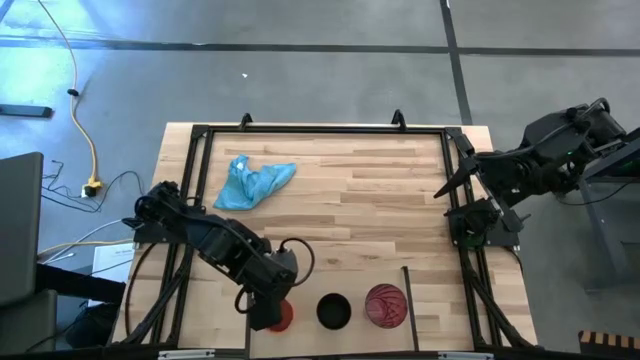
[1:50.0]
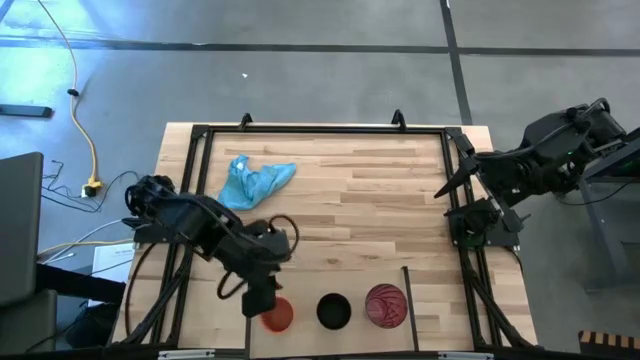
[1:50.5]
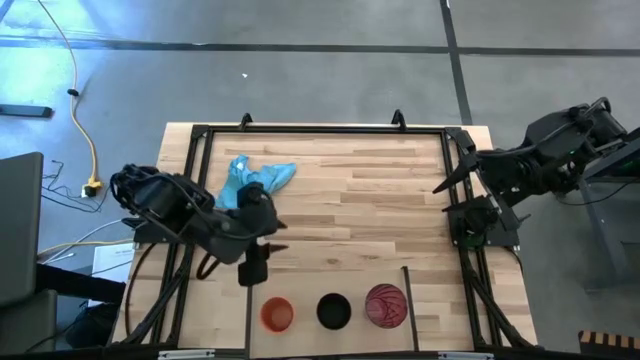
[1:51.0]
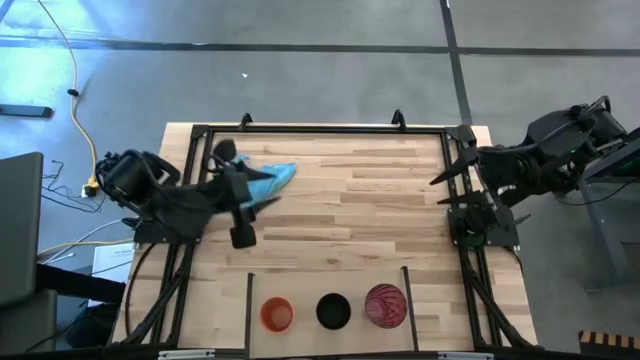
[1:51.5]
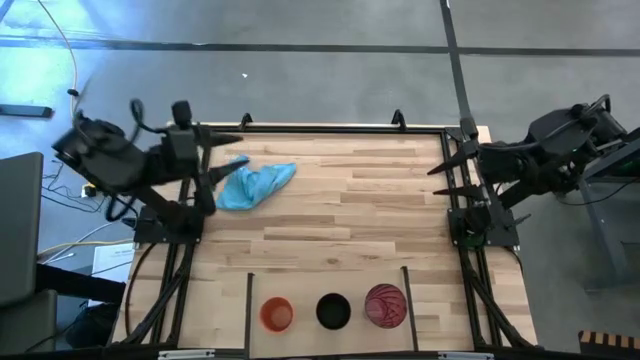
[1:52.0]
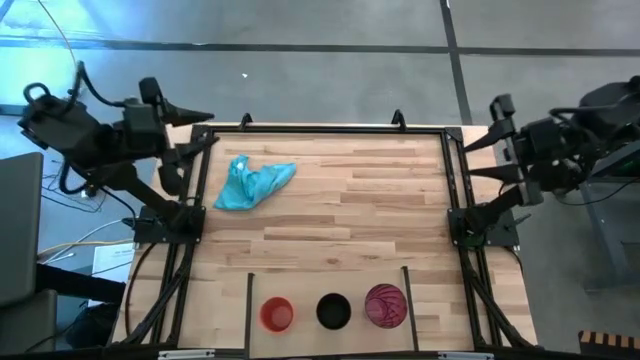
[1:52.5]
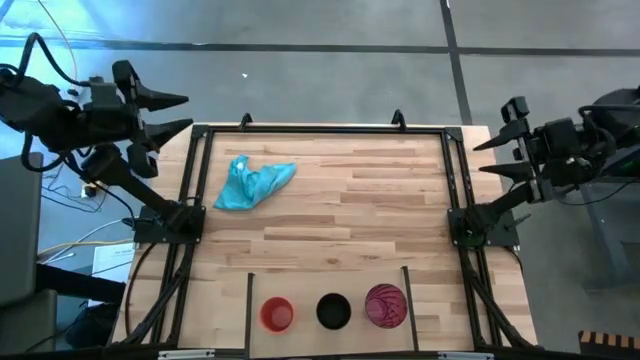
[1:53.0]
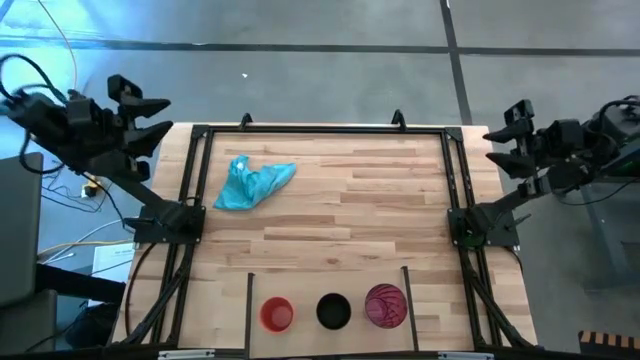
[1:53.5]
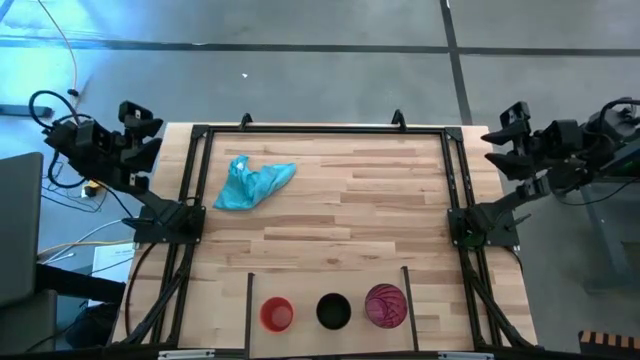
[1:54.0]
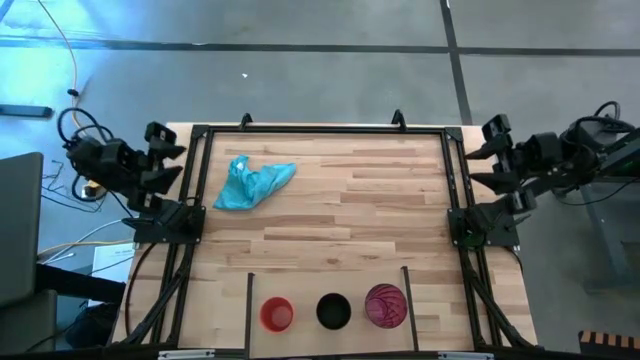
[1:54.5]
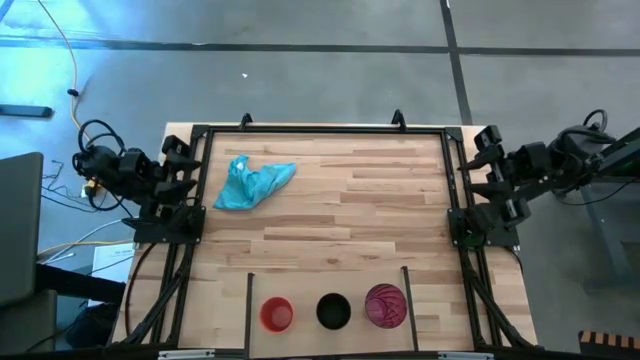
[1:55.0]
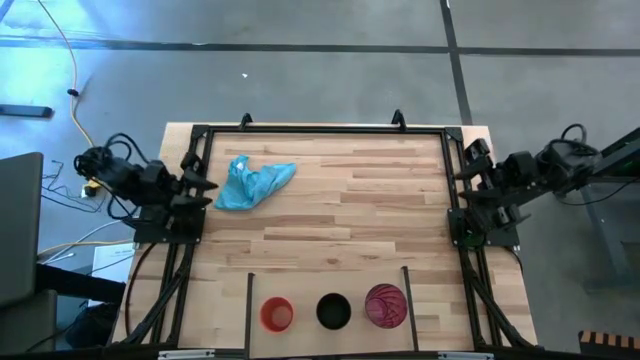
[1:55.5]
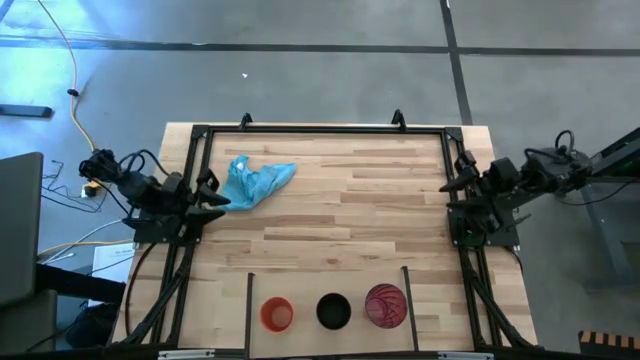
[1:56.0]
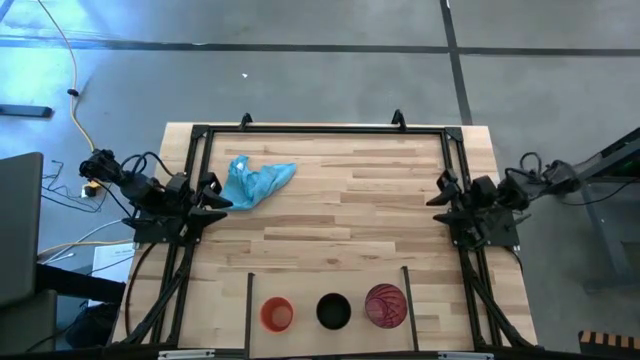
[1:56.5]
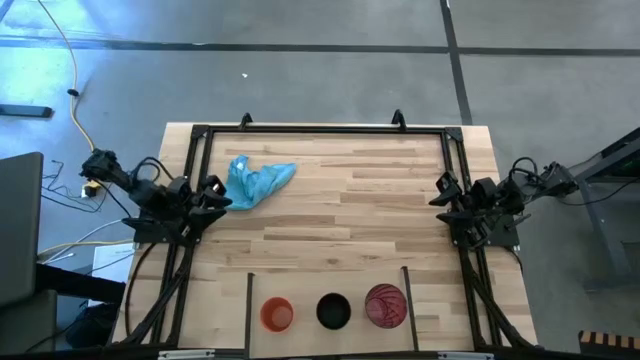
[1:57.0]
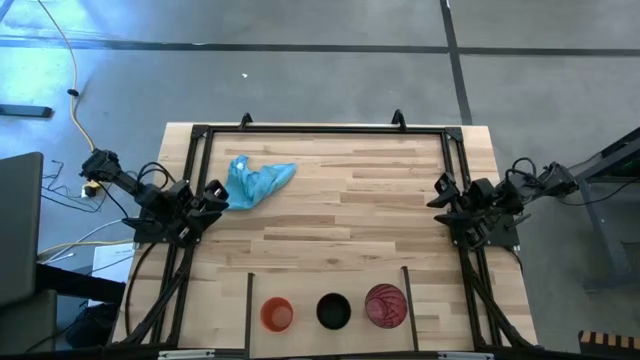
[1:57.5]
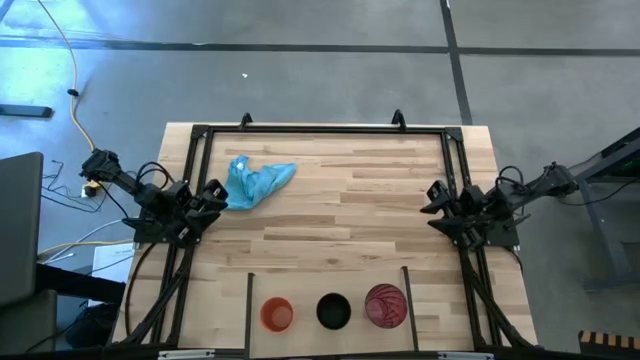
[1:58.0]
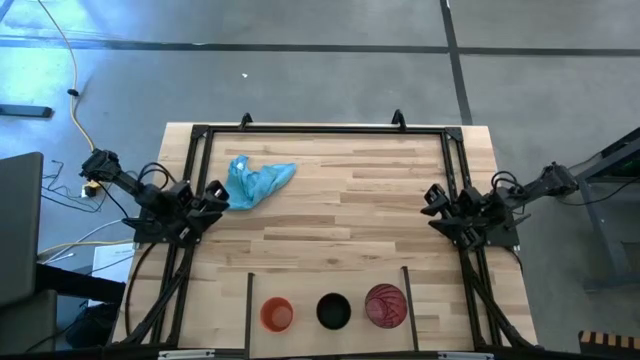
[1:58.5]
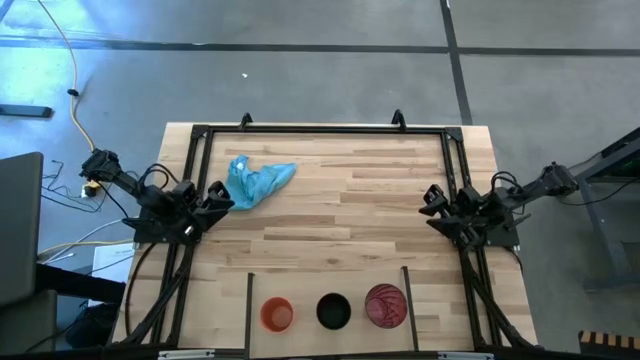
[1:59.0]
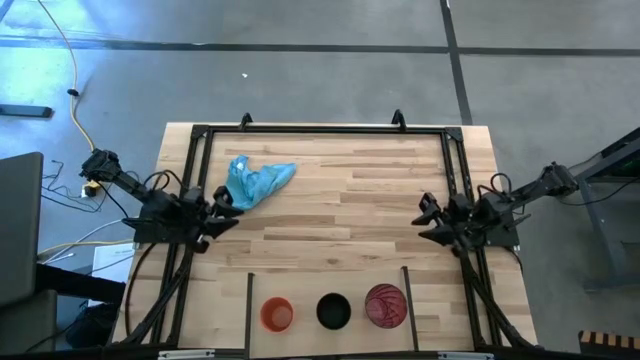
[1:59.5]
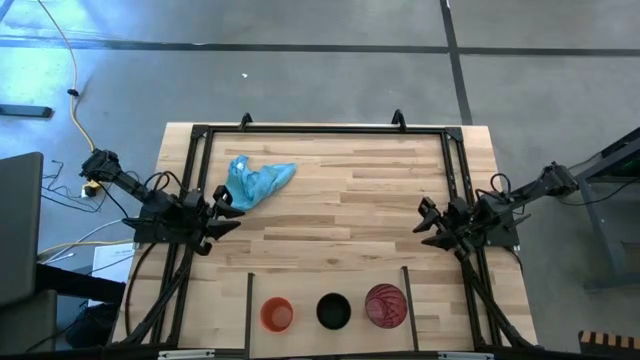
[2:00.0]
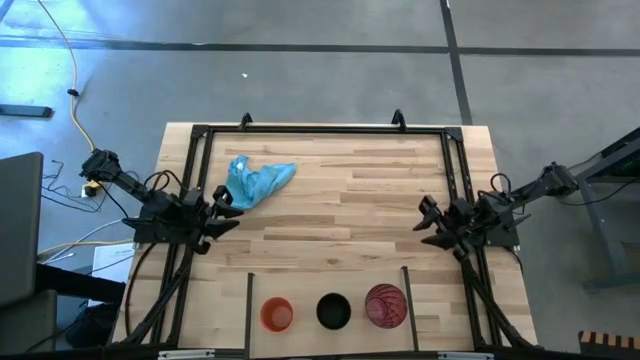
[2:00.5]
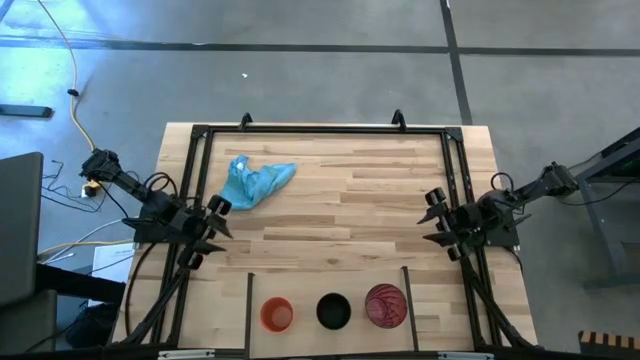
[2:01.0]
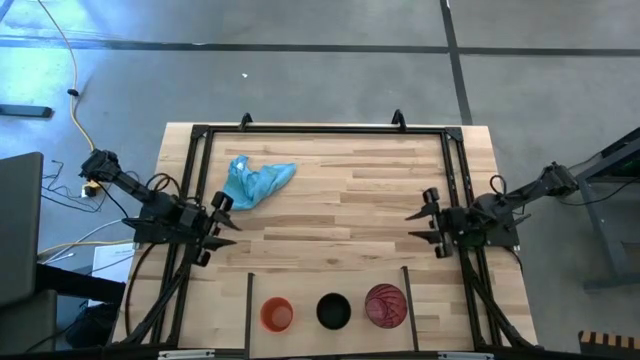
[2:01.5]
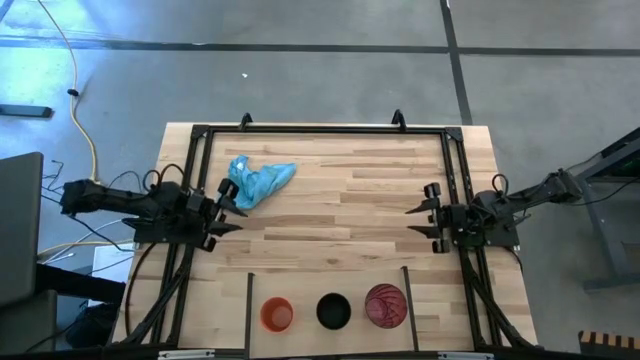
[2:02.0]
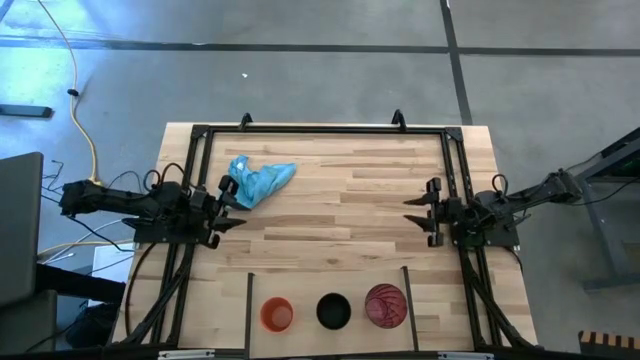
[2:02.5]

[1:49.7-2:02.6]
Task: Stack small to large cups/mugs on shelf
Return to Home Position

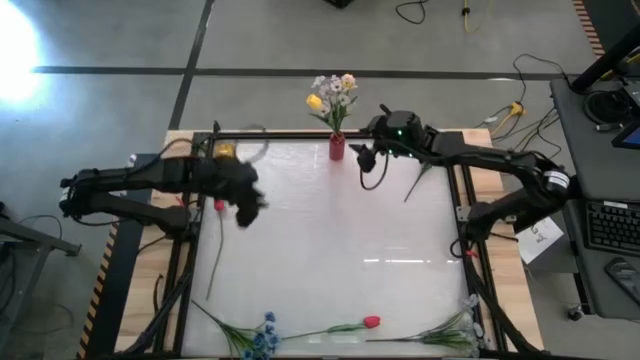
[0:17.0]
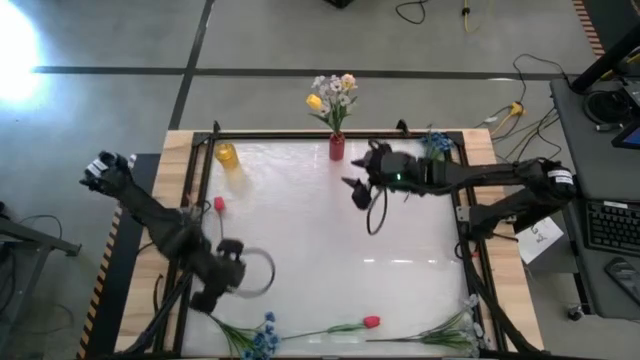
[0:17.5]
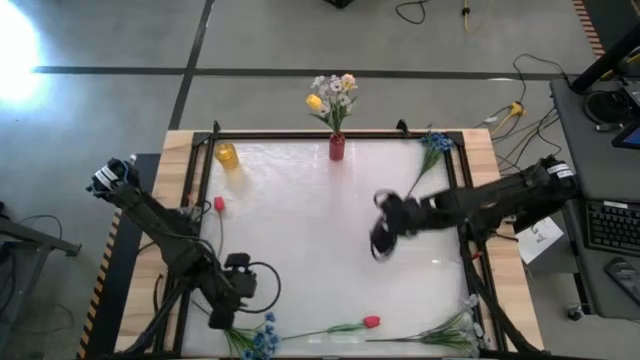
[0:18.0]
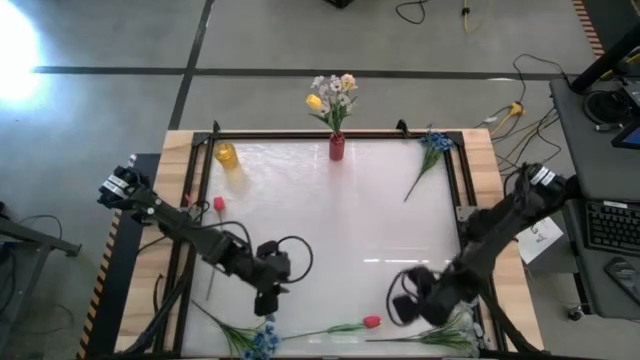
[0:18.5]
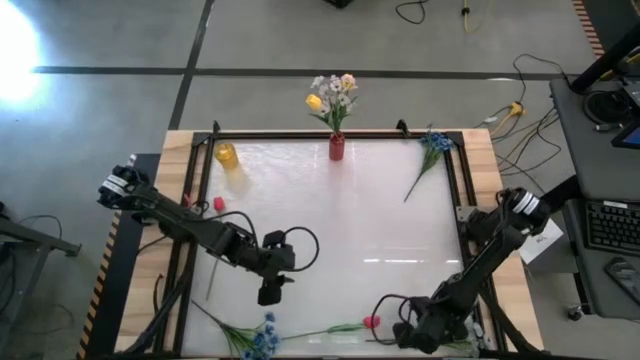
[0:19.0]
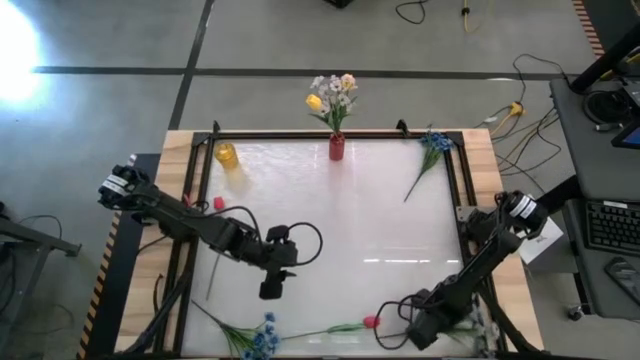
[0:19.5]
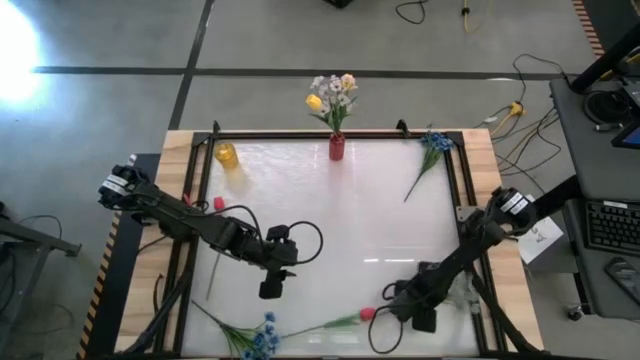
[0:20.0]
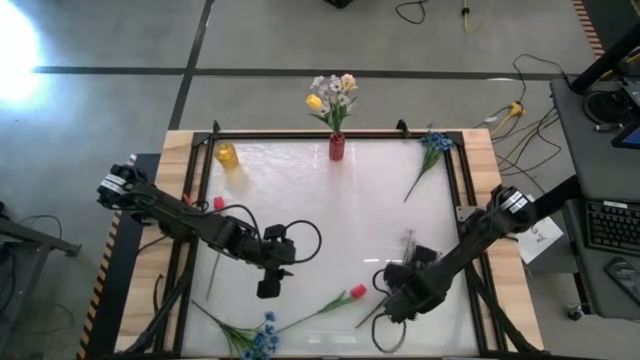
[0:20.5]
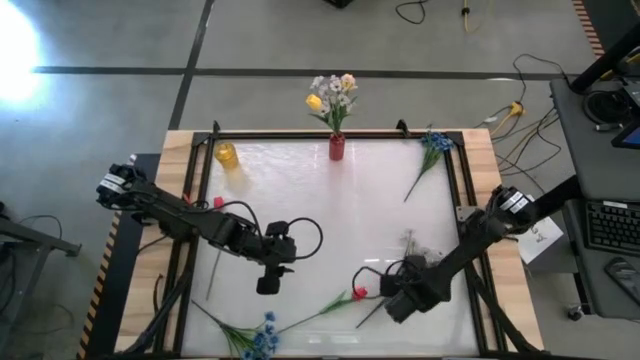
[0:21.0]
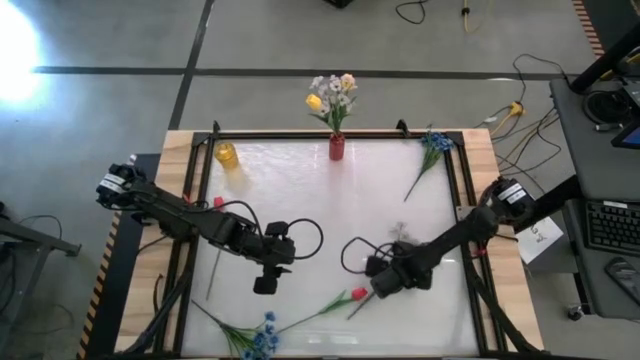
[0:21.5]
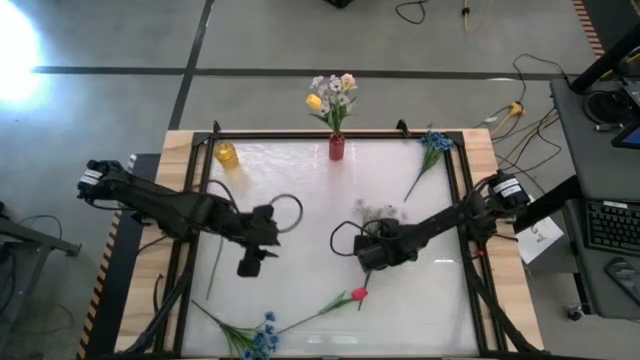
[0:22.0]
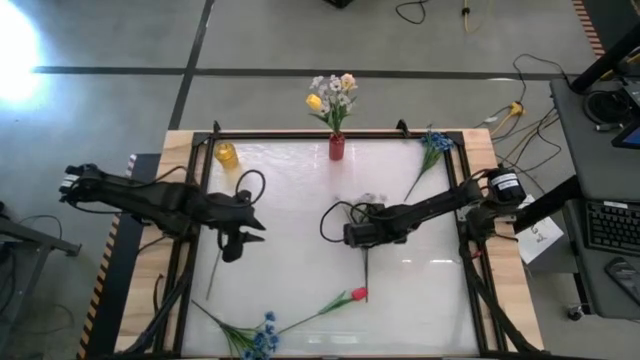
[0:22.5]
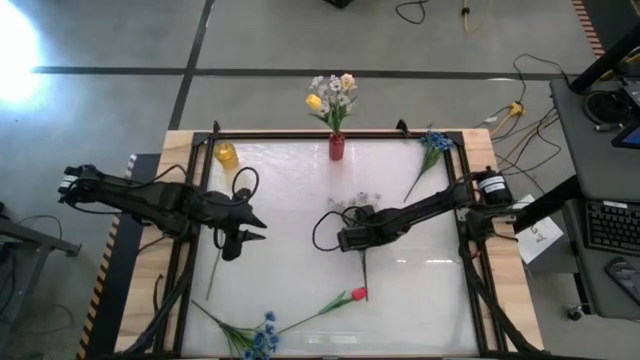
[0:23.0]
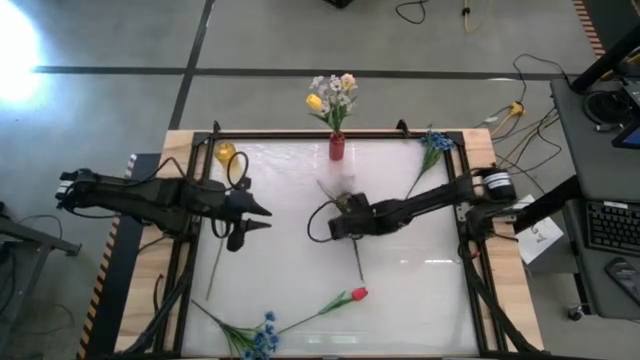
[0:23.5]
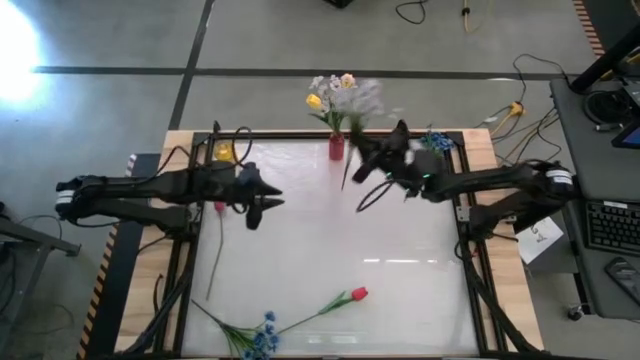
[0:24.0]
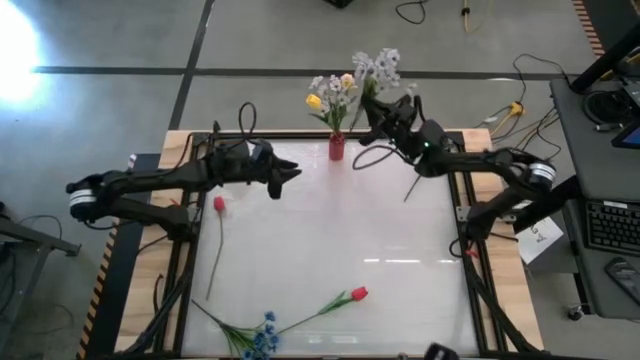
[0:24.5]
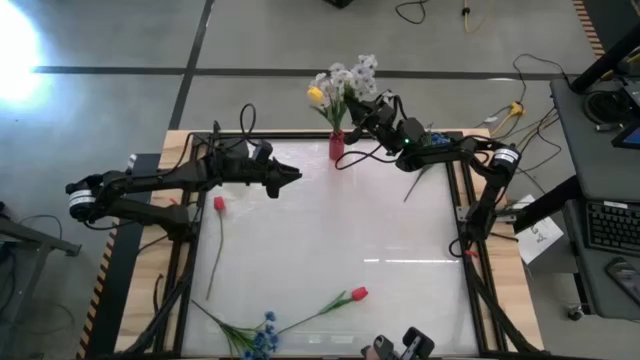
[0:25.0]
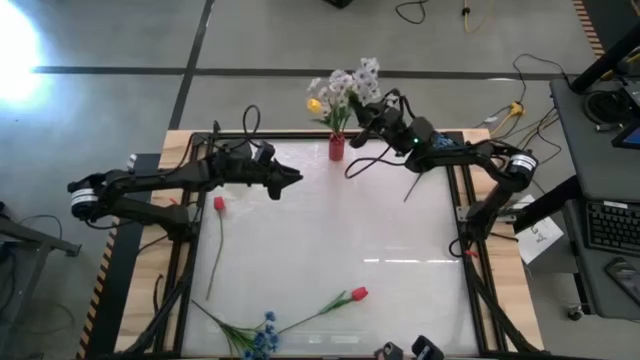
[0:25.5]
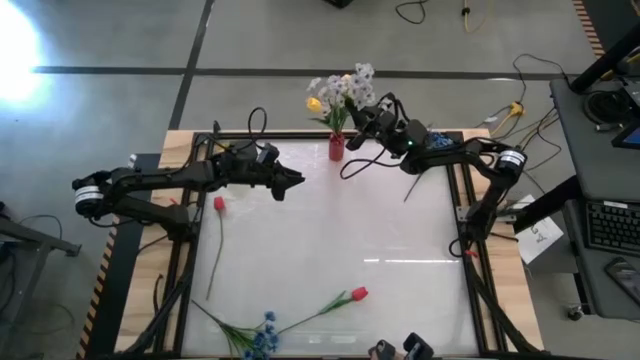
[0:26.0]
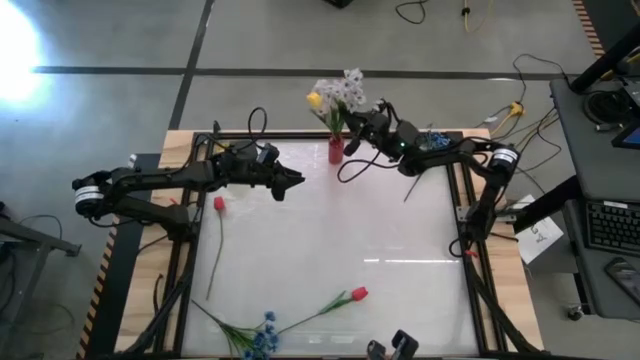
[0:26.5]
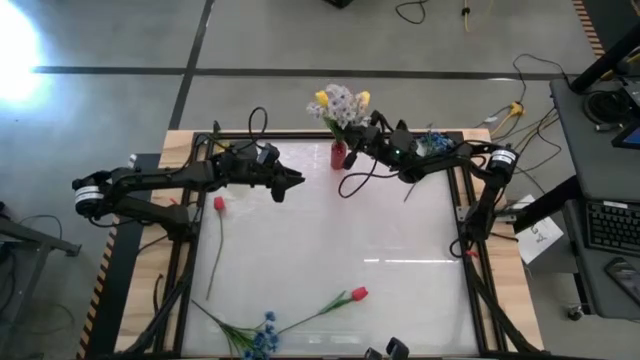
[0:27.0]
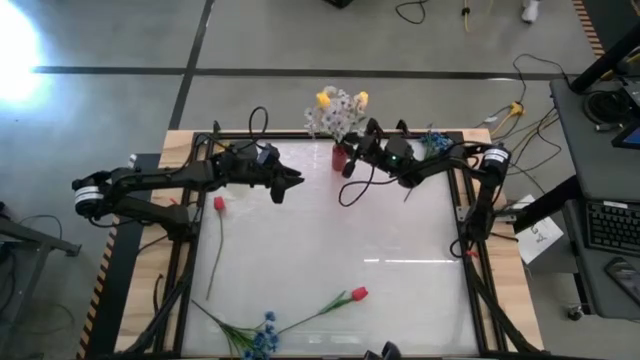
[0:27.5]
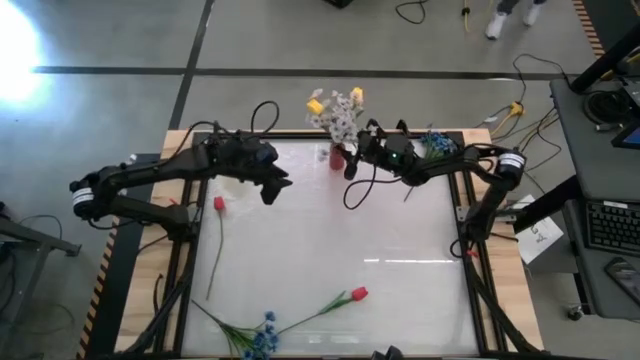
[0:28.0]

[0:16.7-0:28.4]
Task: Sort flowers into vase by color
Put the white flowers into the red vase
